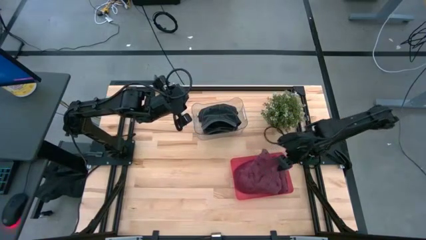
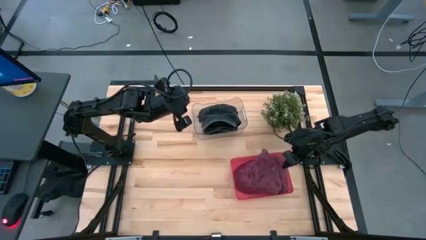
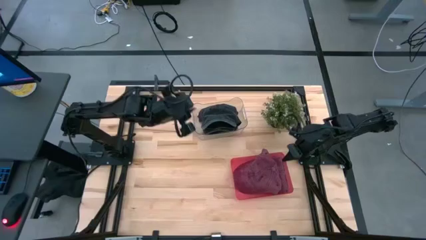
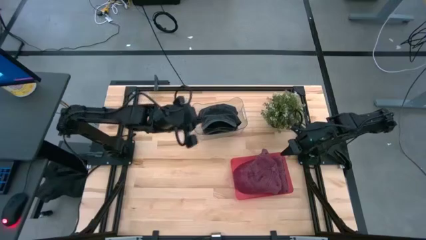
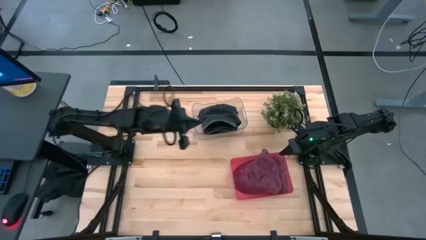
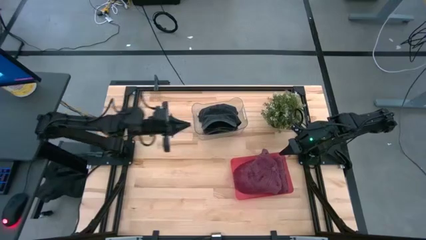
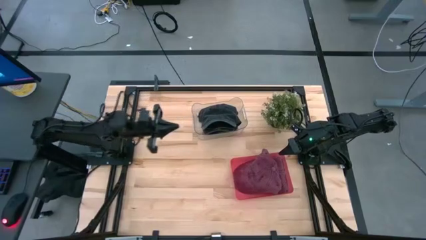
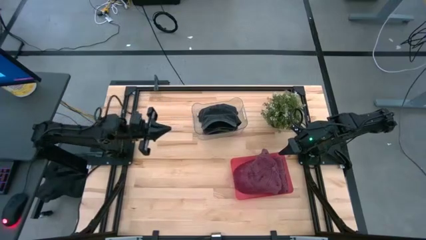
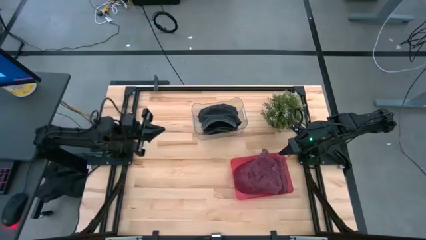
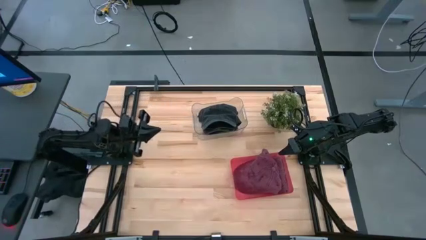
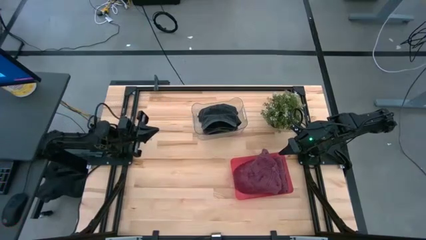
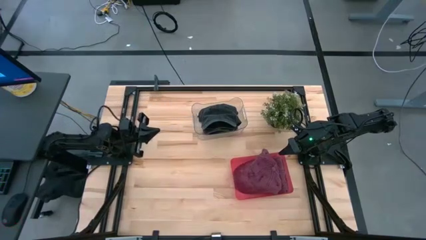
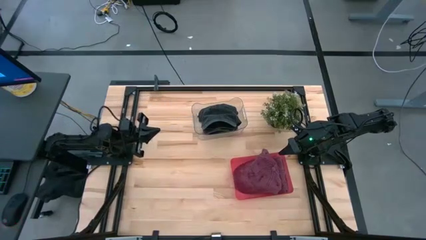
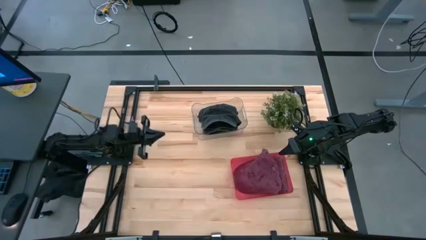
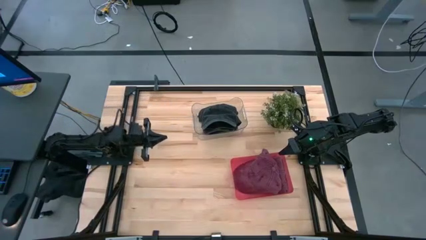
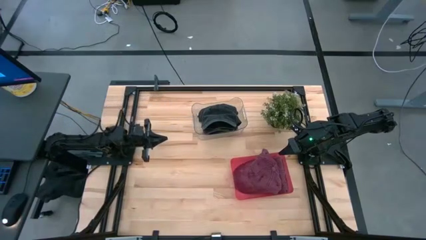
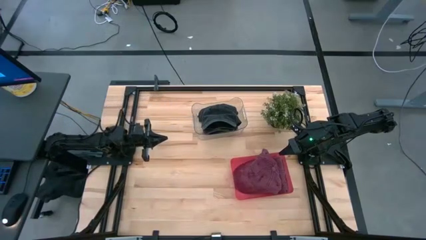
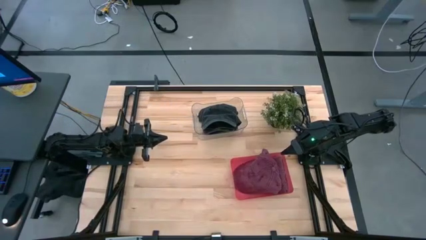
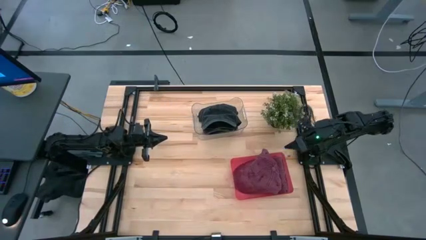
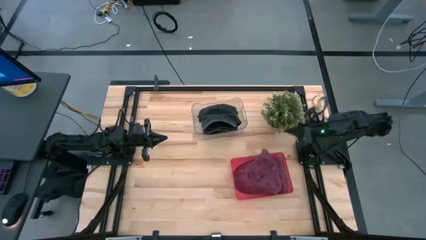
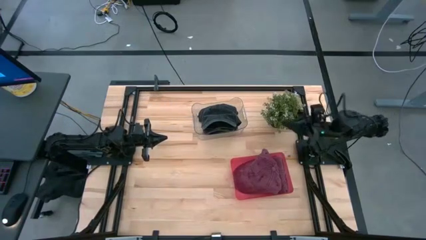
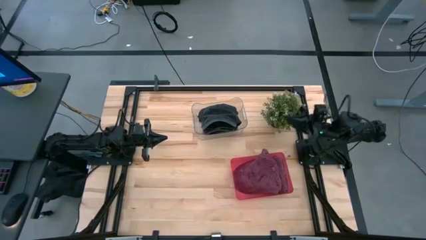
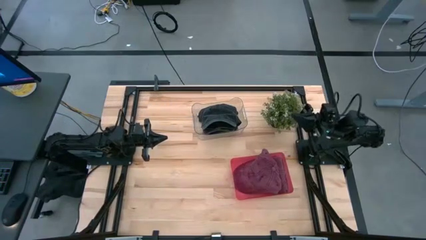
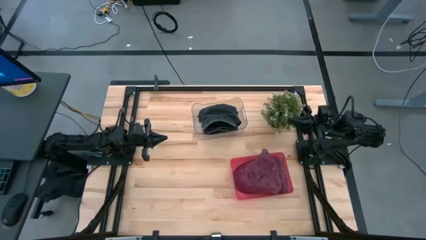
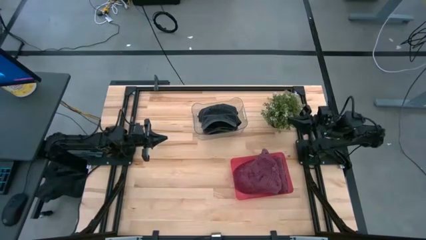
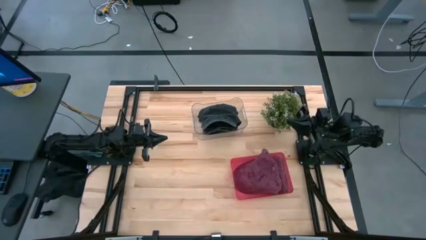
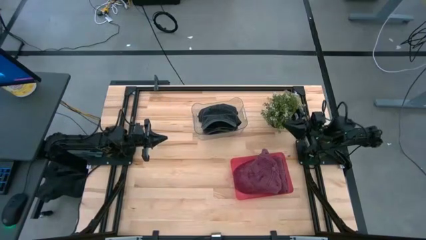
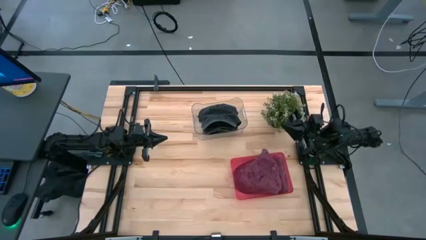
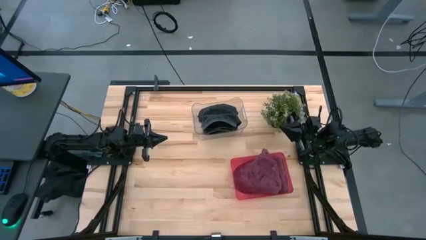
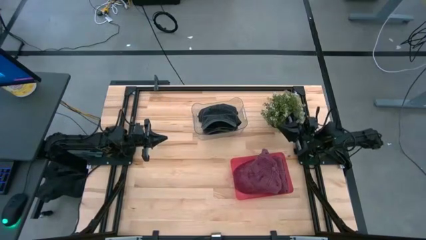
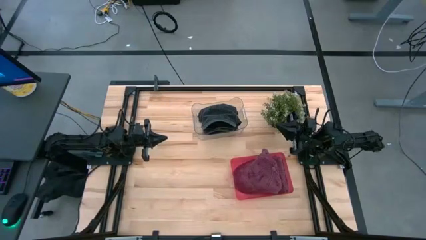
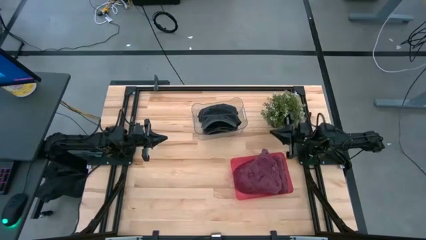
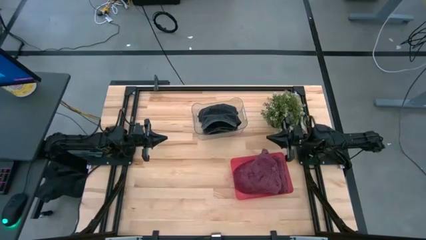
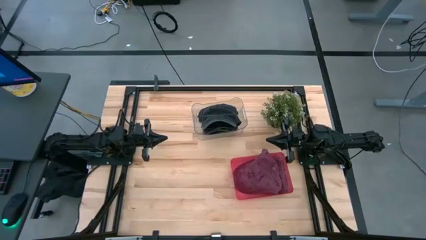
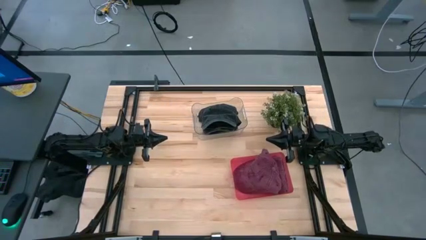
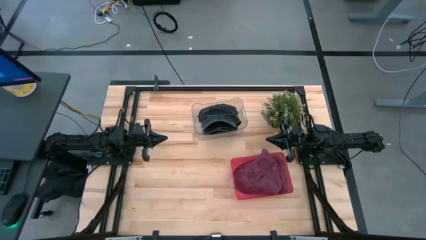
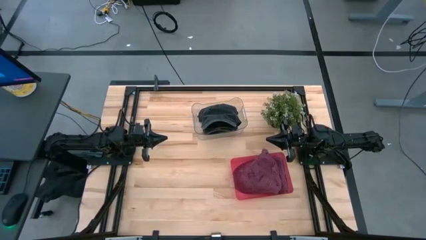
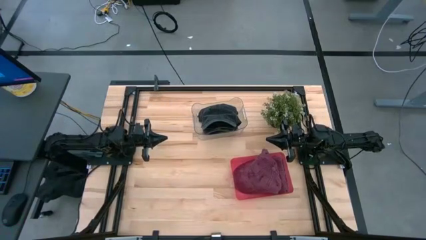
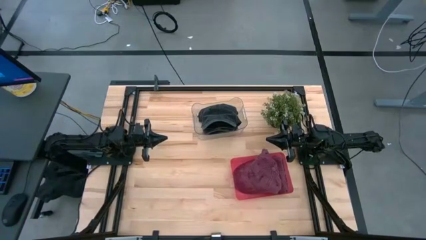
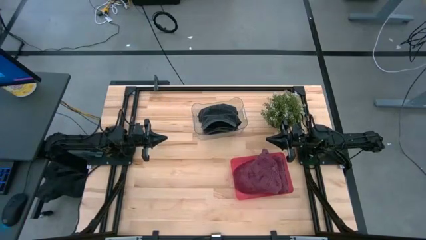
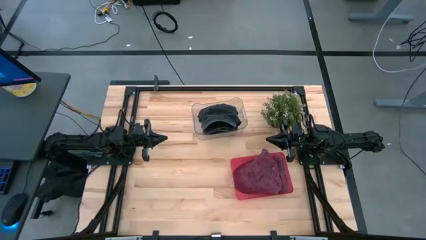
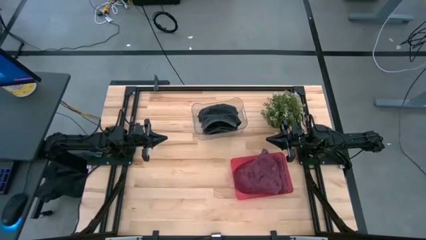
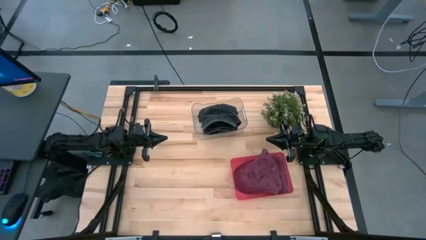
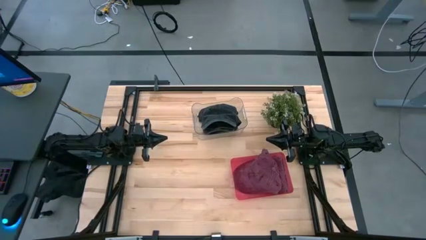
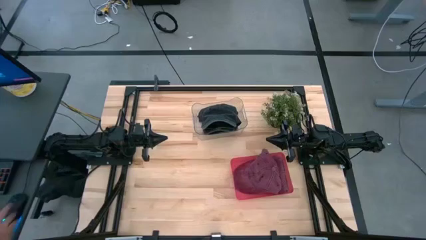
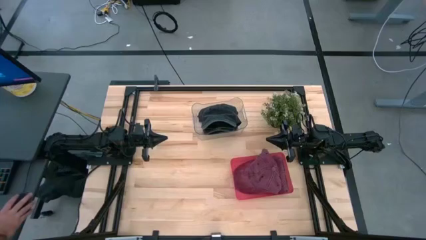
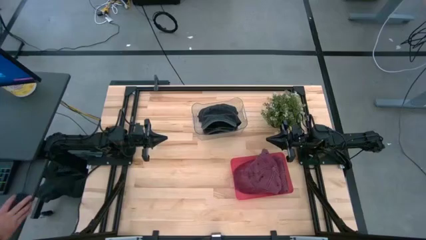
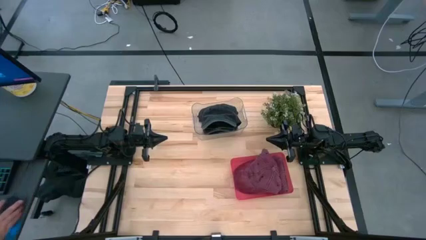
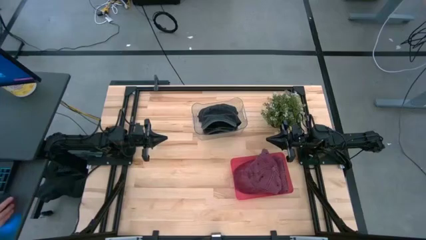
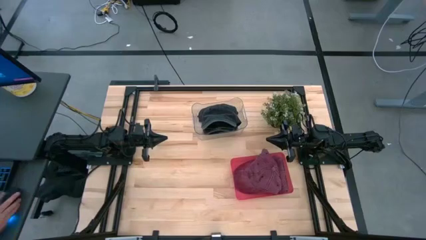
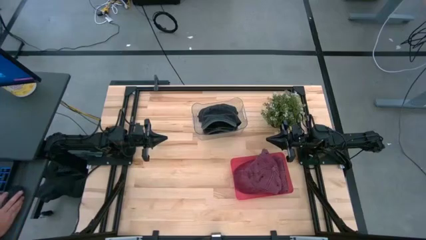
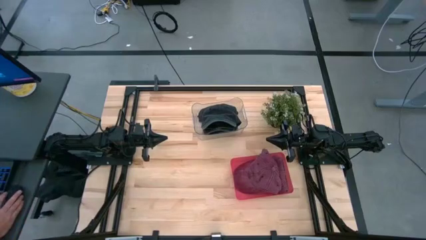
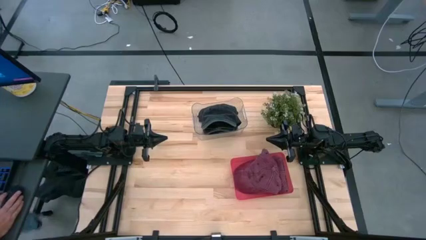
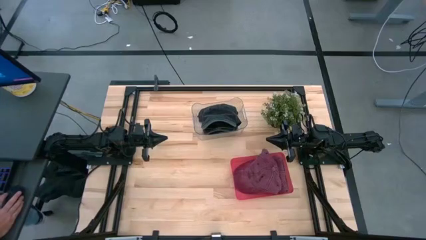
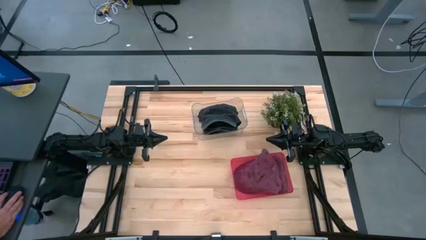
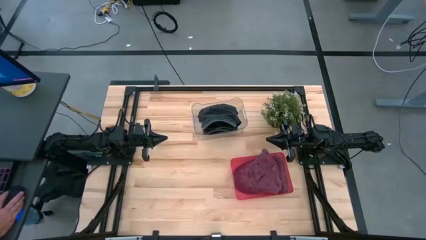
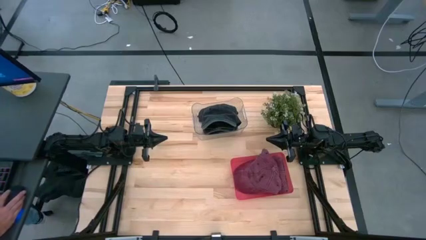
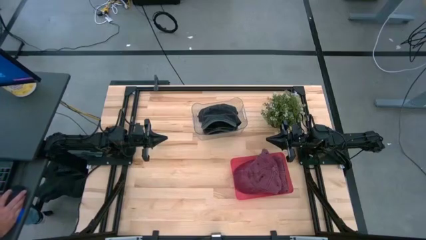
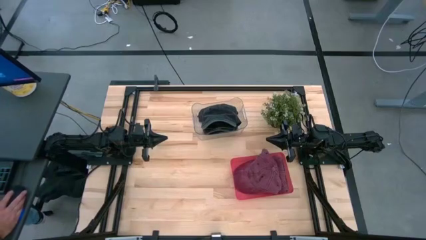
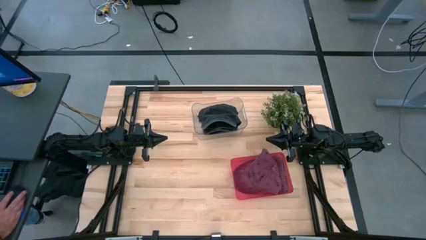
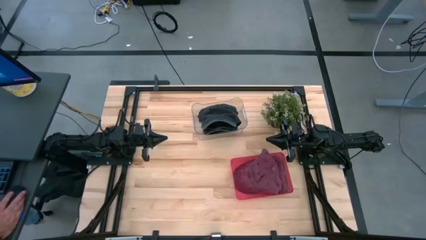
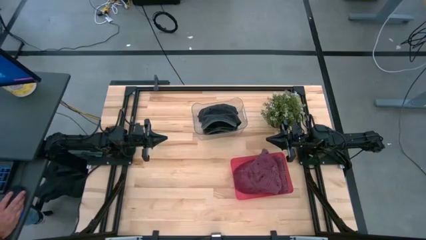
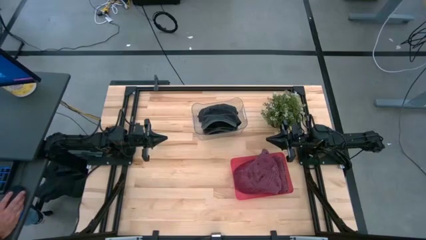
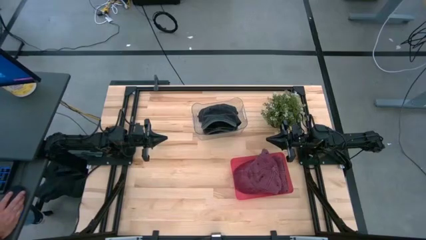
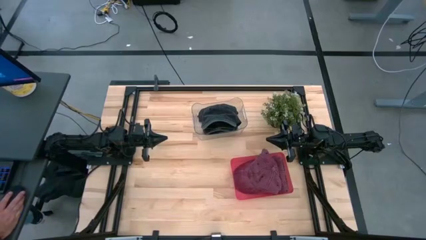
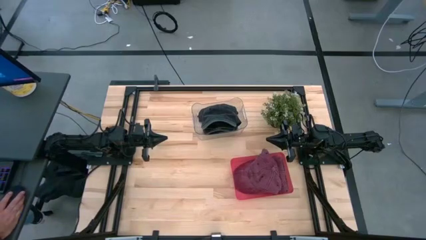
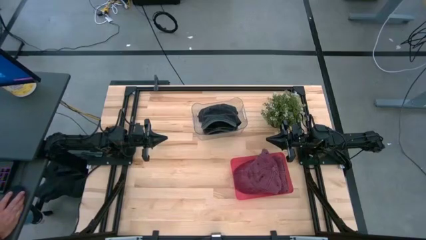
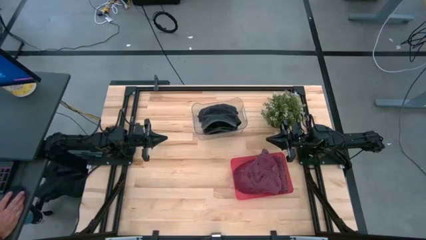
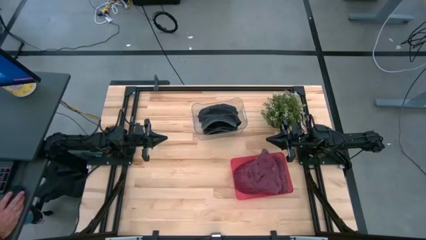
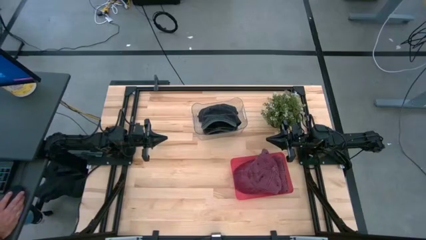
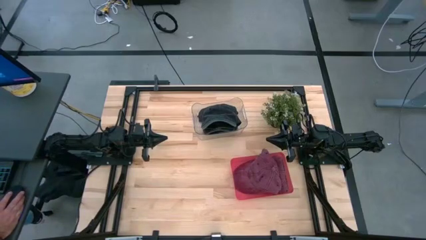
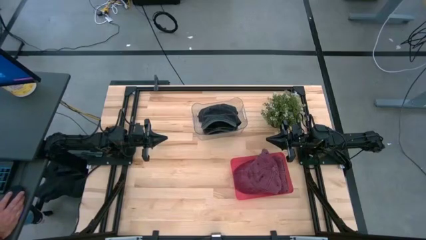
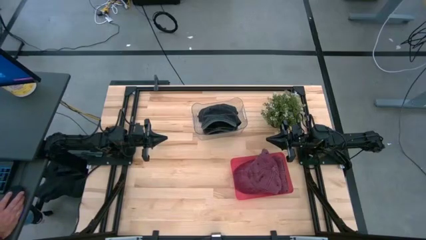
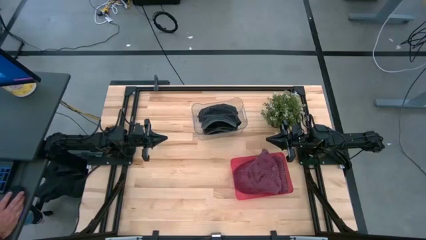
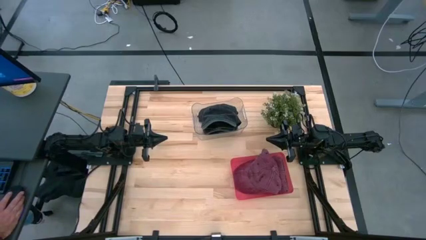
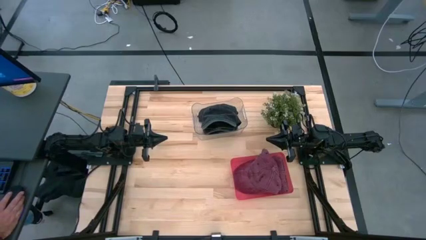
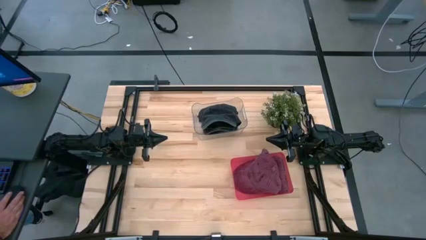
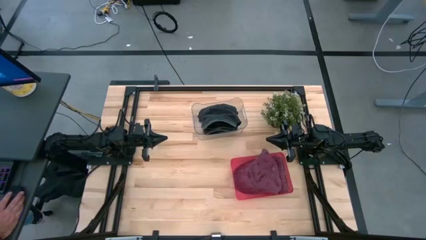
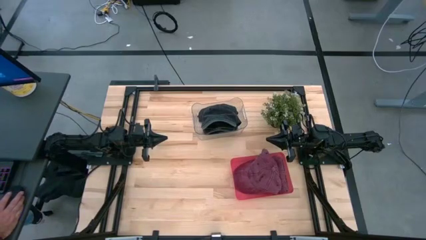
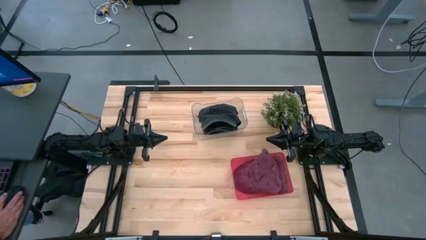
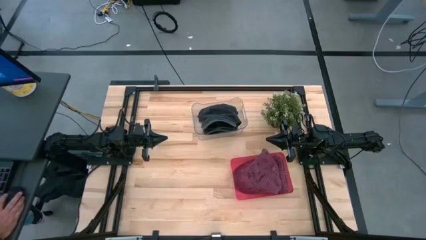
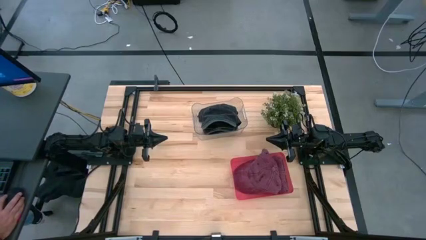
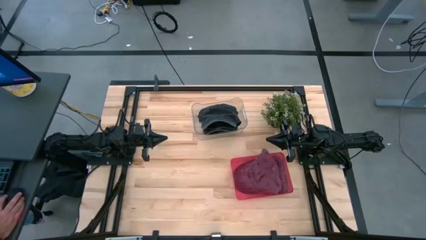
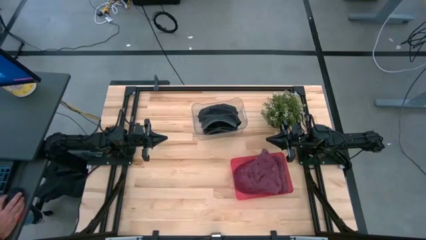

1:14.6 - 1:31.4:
Task: Pick & Place hat
Return to Home Position
